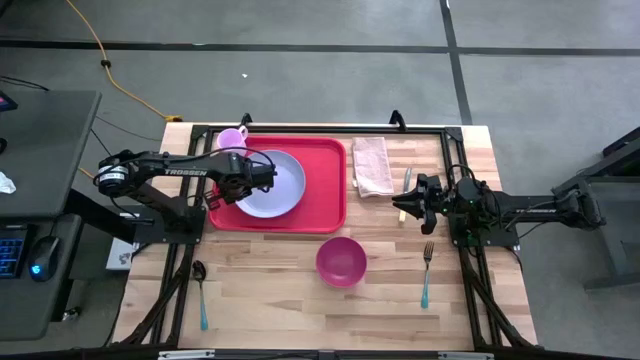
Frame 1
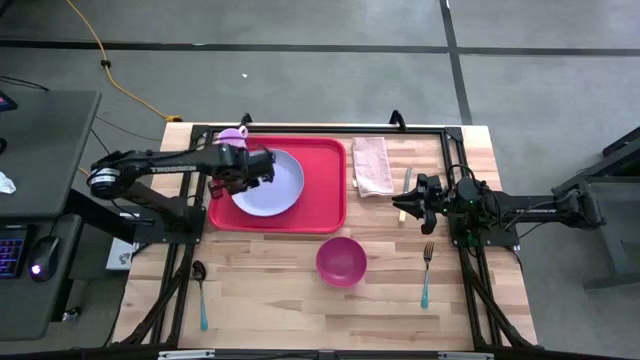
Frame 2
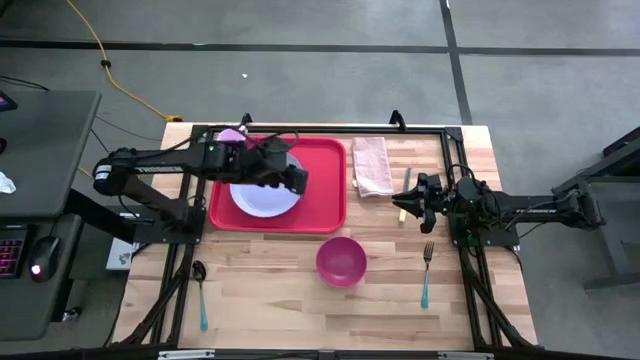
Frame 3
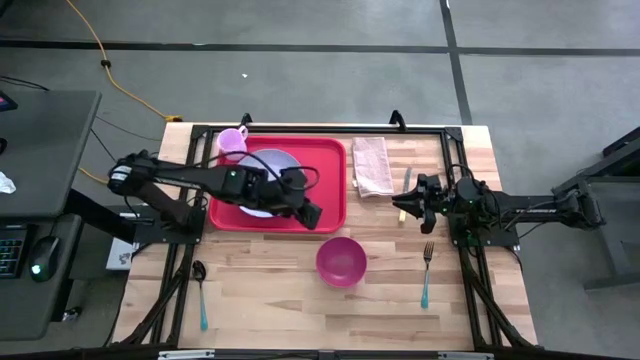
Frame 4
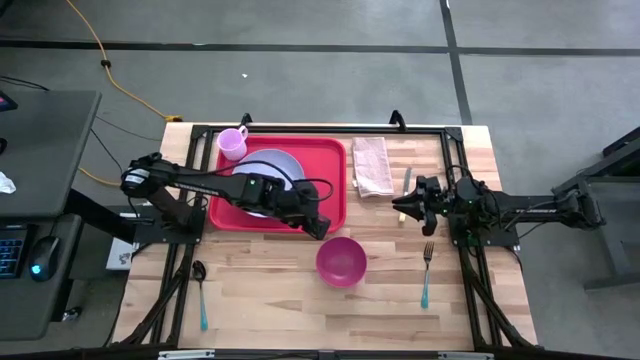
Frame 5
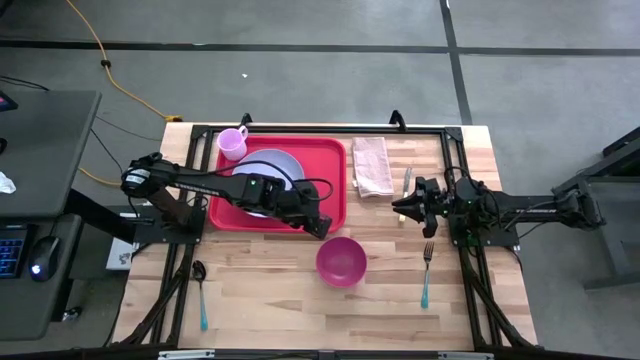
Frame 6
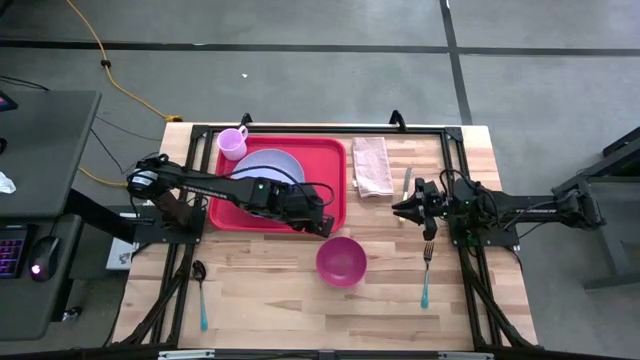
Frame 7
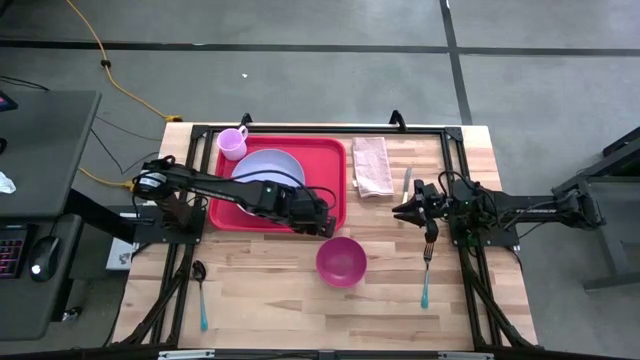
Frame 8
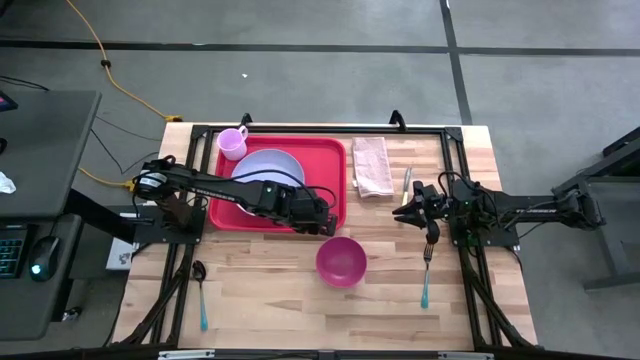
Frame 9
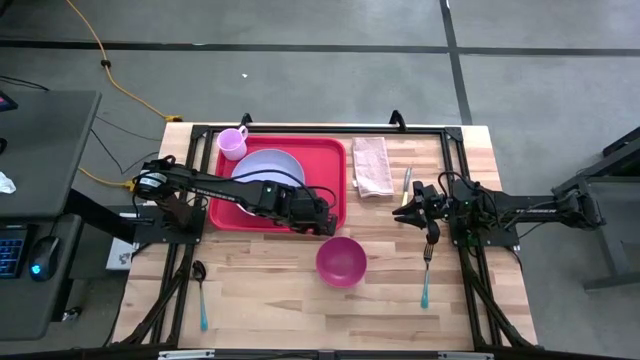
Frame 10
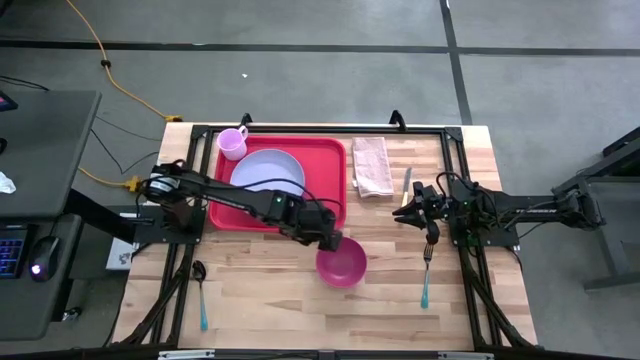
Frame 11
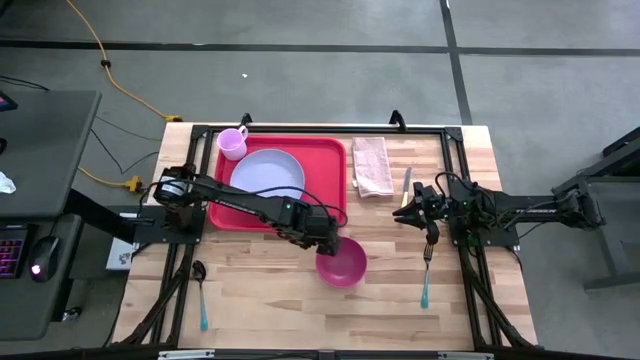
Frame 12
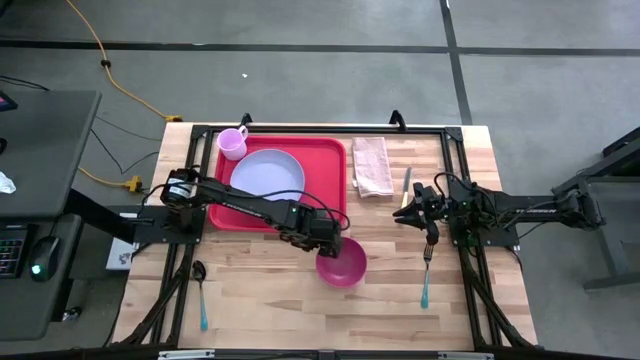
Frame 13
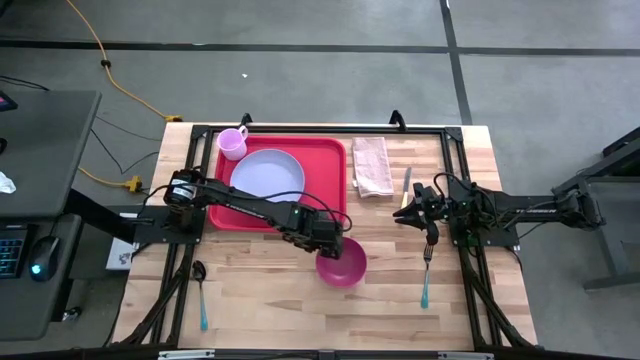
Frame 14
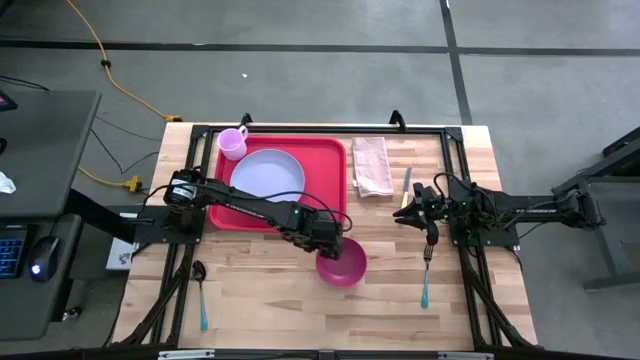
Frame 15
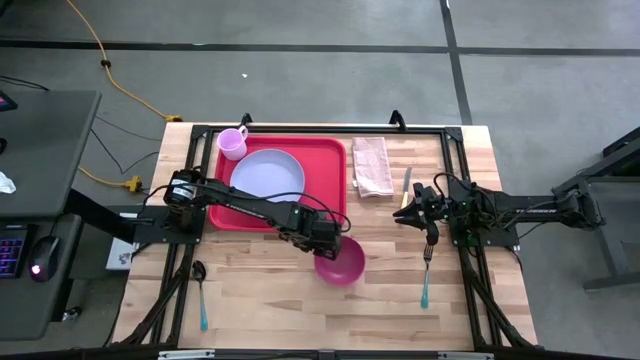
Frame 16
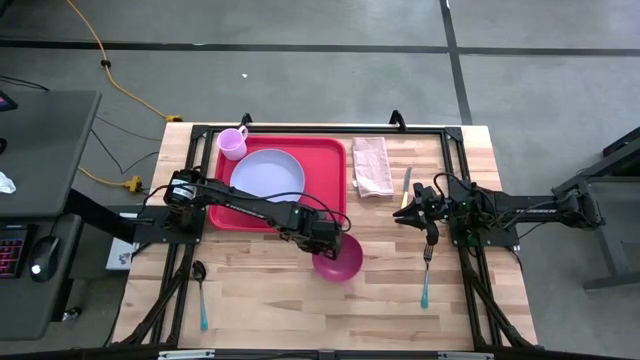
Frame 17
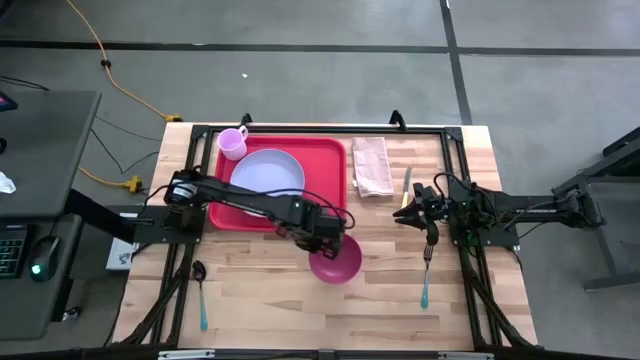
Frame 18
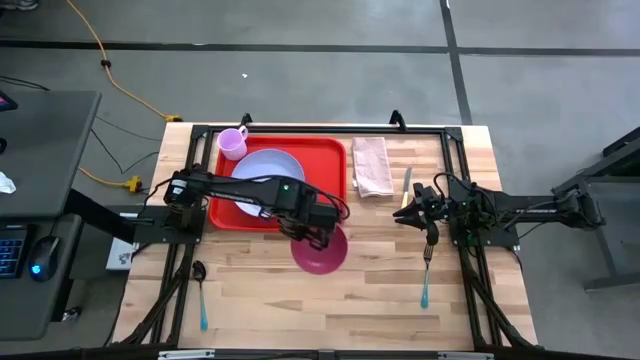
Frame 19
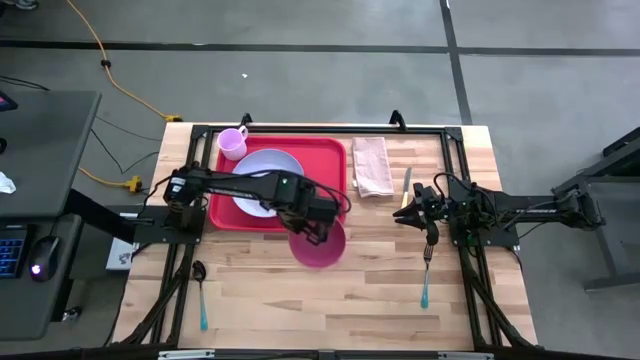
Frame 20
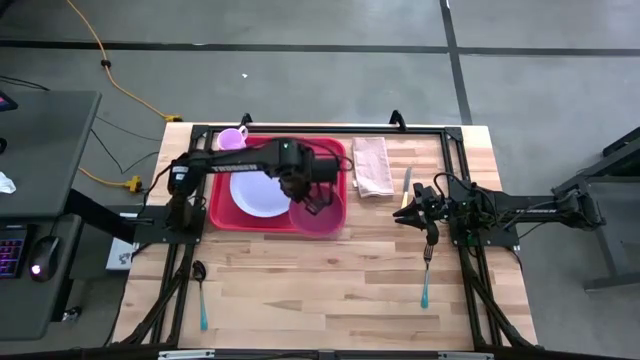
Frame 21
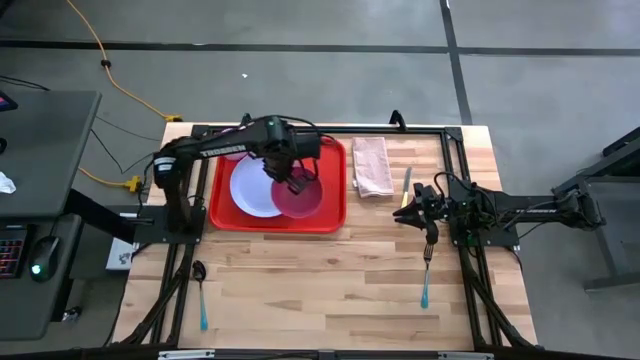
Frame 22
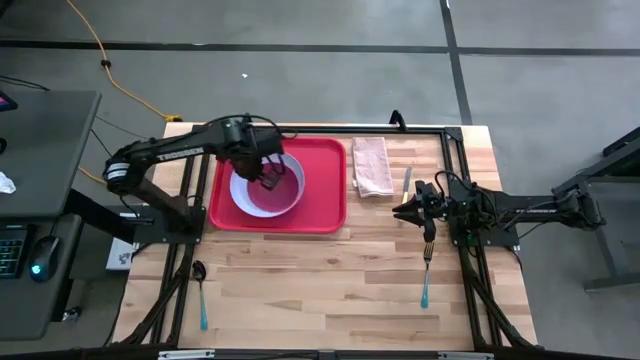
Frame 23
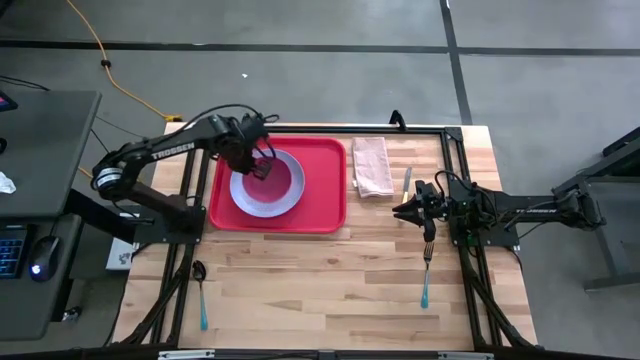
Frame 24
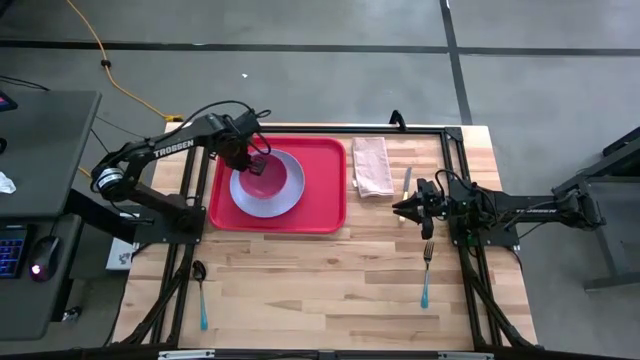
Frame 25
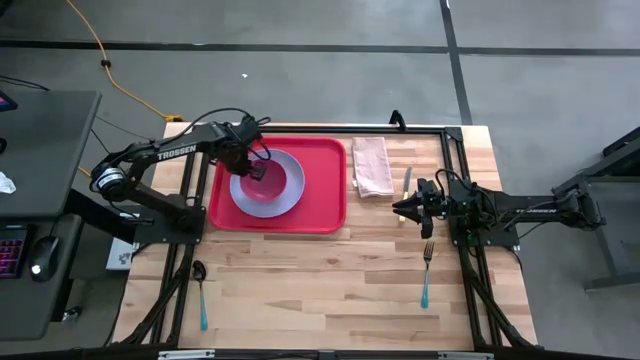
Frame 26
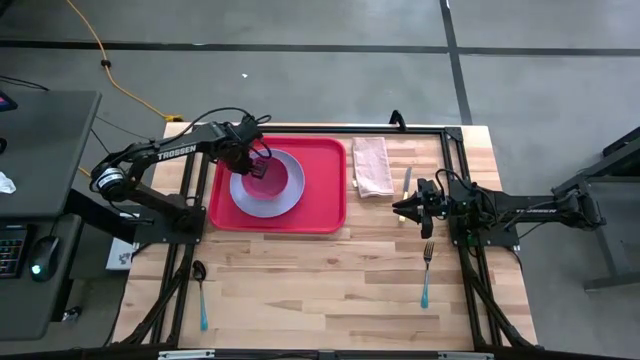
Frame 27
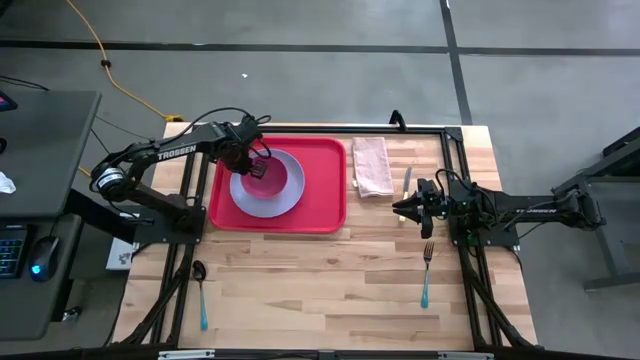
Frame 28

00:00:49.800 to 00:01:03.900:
Task: Set up tray
Put the red bowl on top of the purple plate on the red serving tray

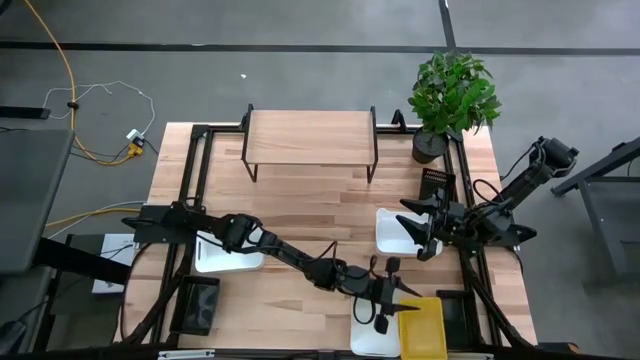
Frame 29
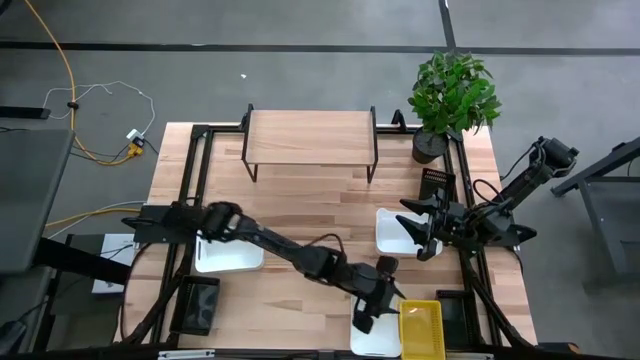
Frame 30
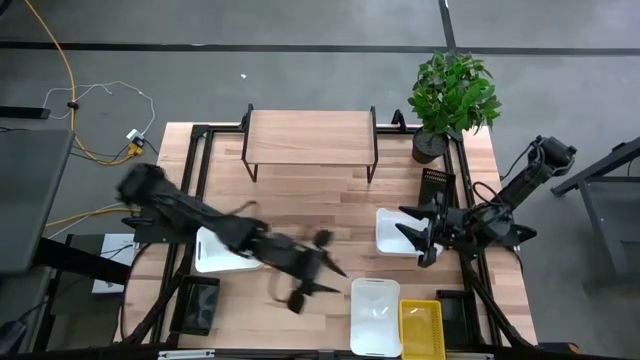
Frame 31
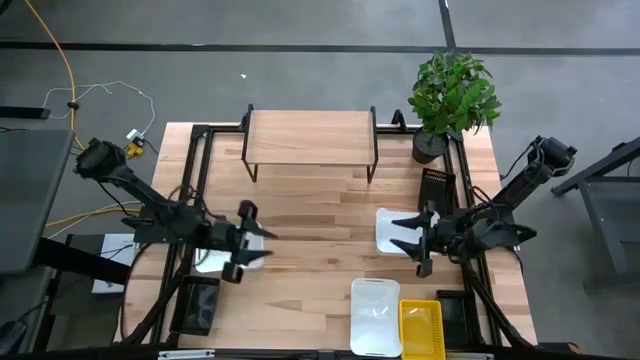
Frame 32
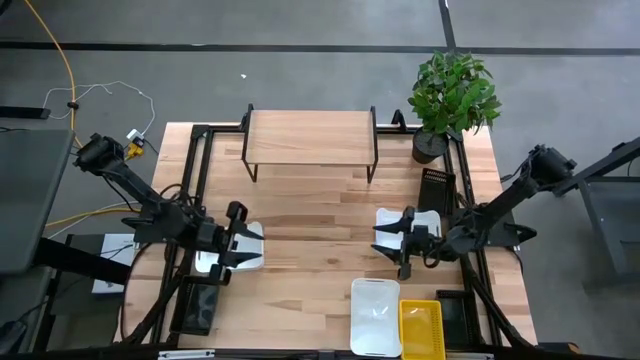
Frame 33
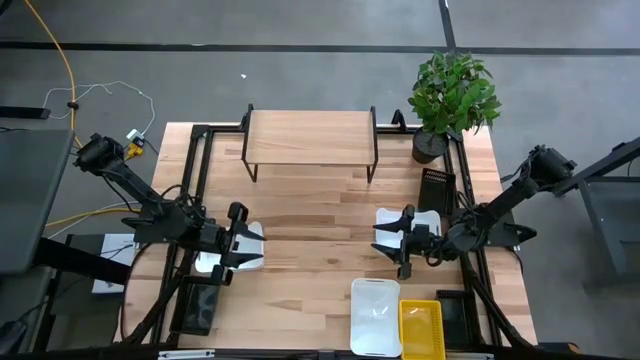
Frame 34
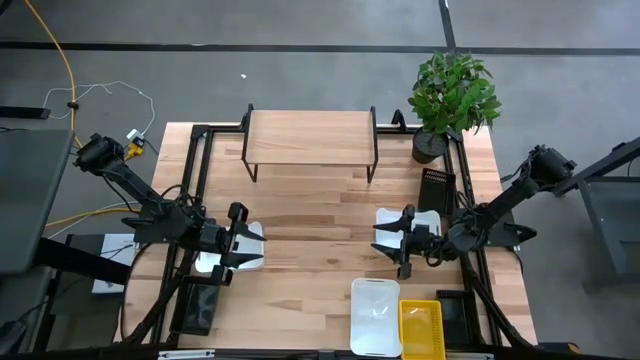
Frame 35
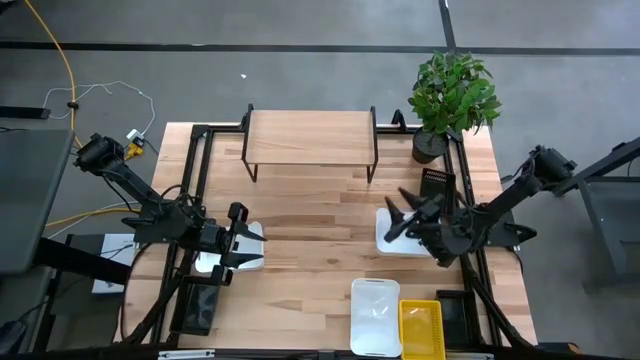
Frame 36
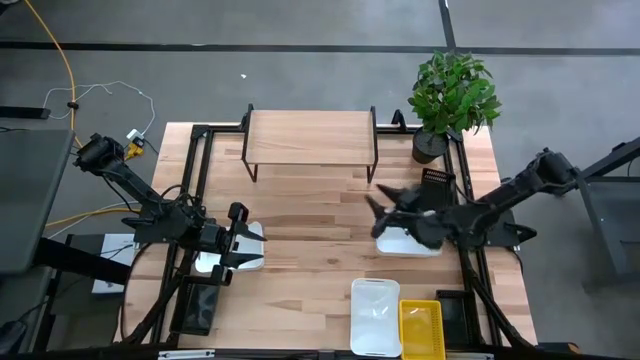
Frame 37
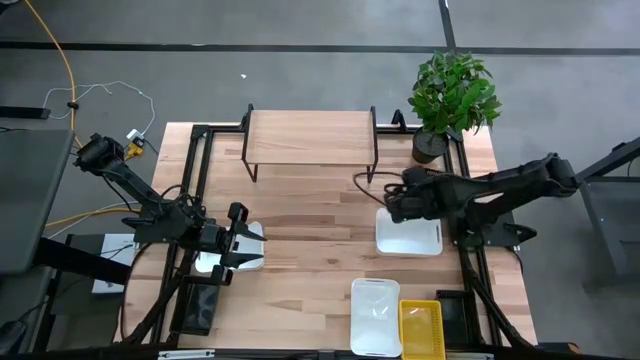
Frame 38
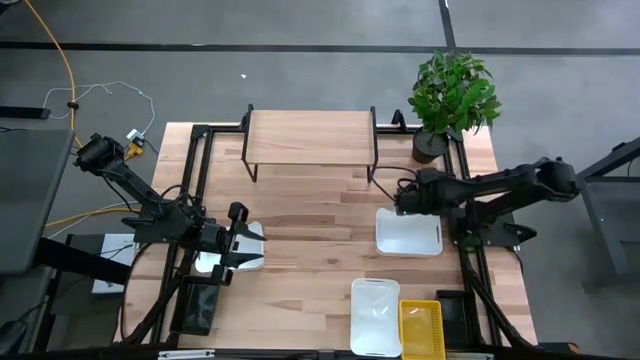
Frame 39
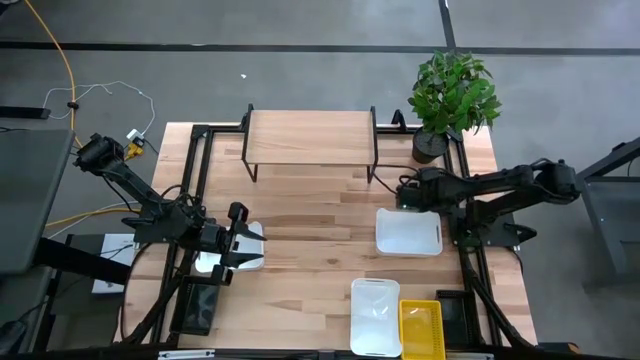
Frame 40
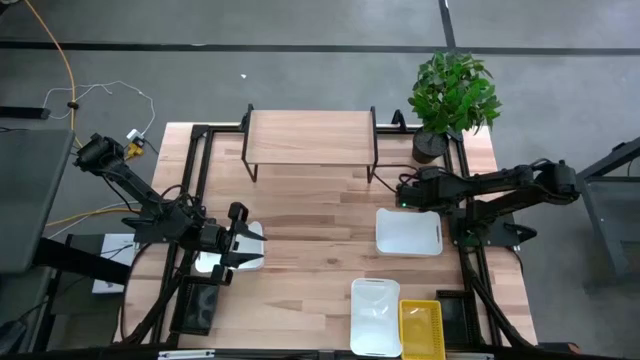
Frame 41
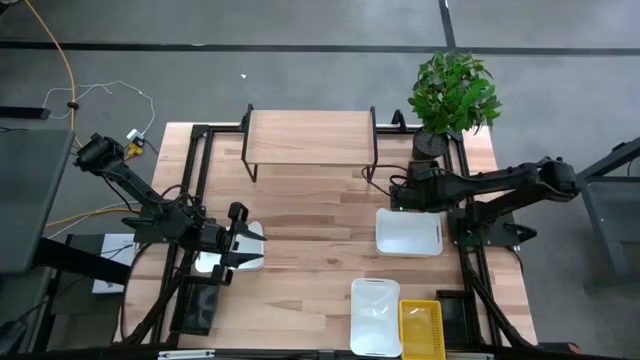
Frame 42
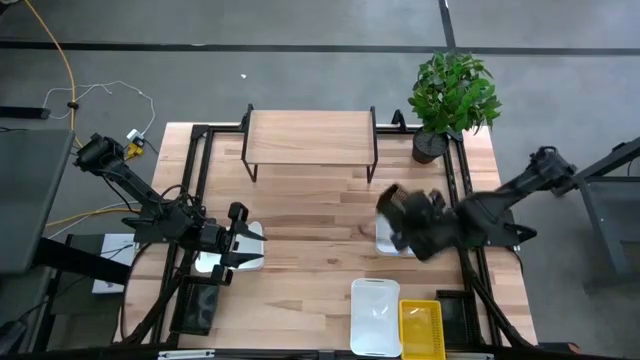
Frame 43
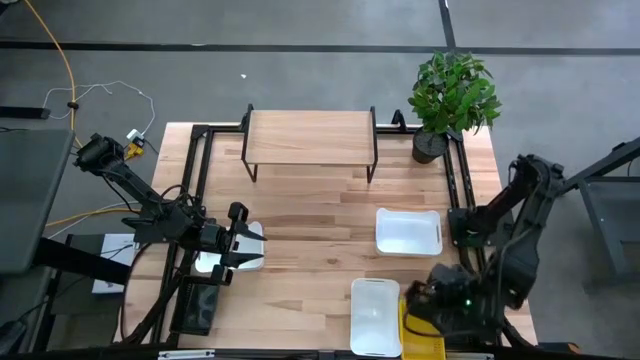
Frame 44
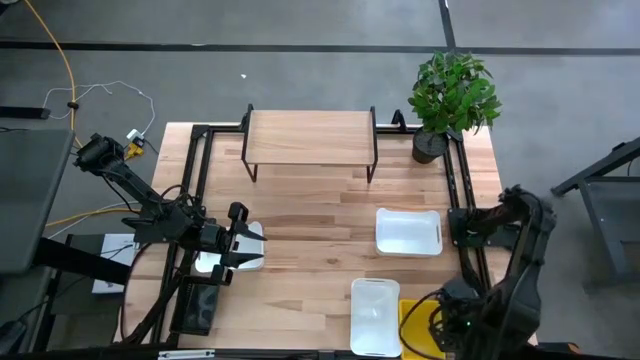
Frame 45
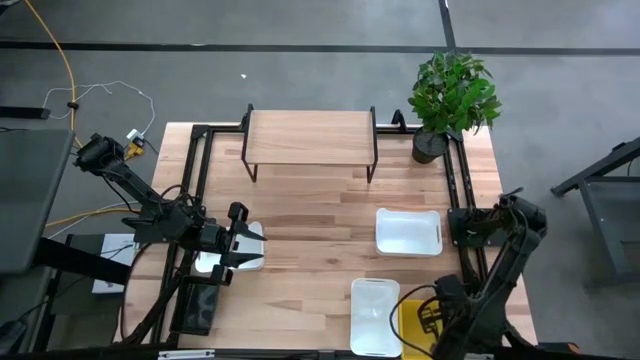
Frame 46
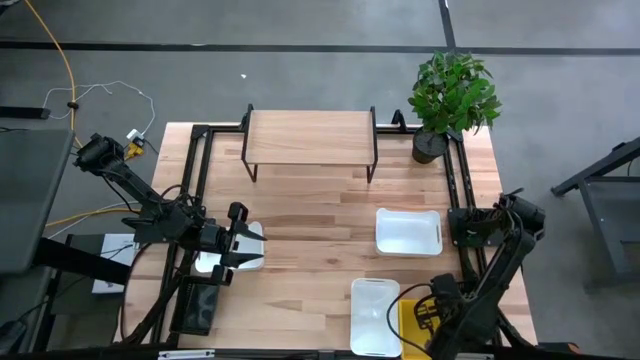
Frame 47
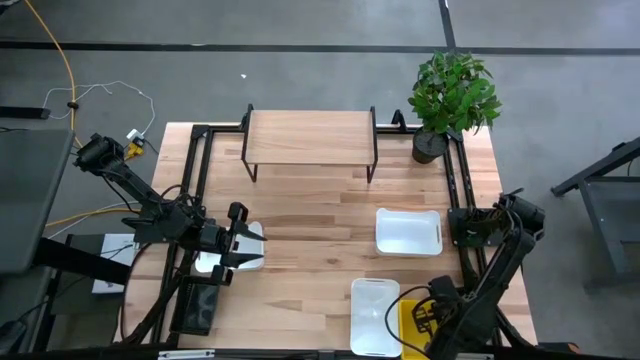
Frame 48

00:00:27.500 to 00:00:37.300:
Task: Stack baskets on shelf by color
Stack the top black bin on the bottom right black bin
